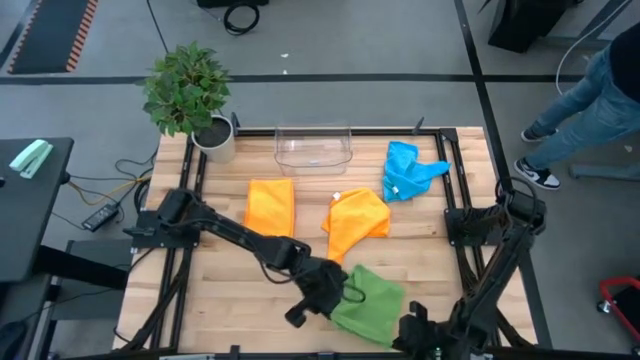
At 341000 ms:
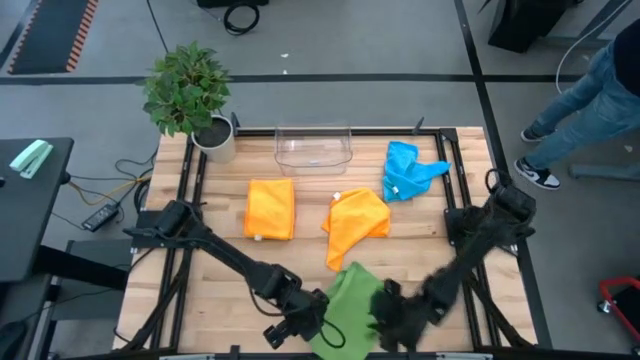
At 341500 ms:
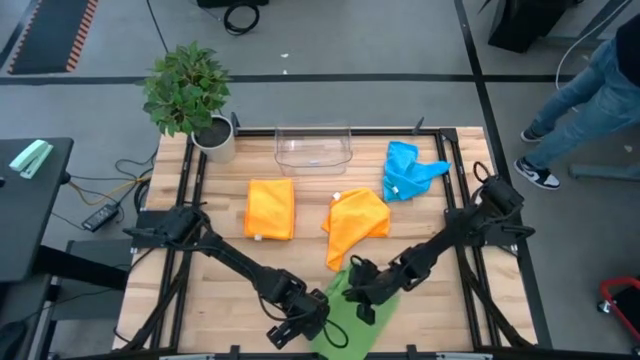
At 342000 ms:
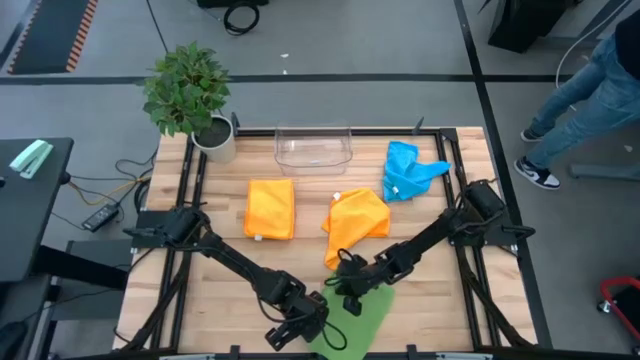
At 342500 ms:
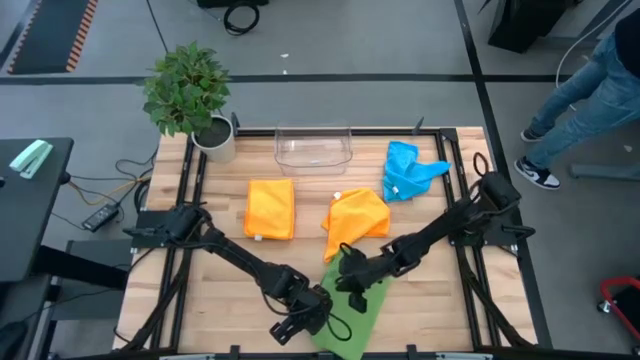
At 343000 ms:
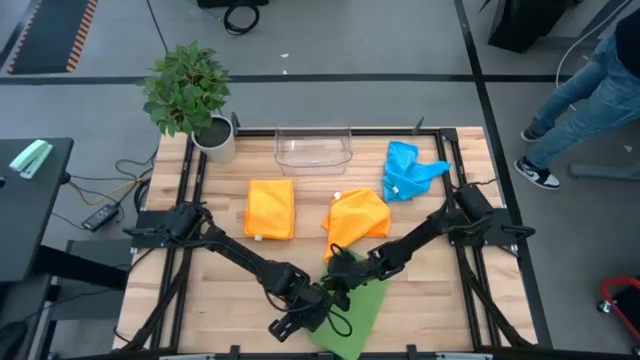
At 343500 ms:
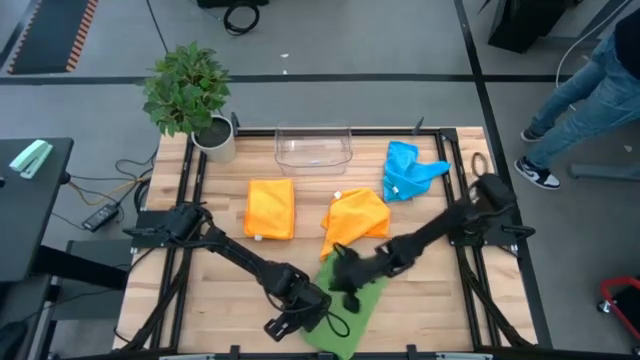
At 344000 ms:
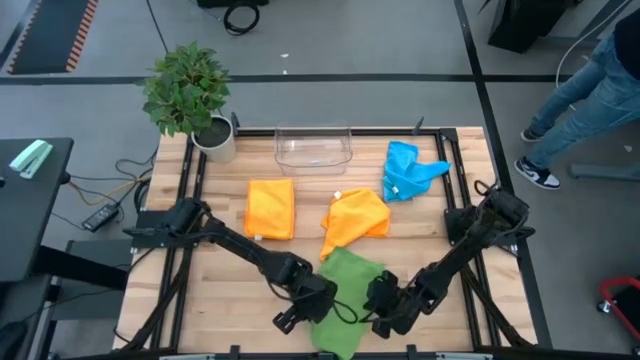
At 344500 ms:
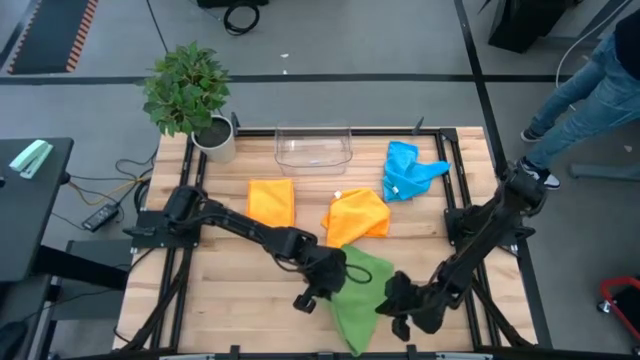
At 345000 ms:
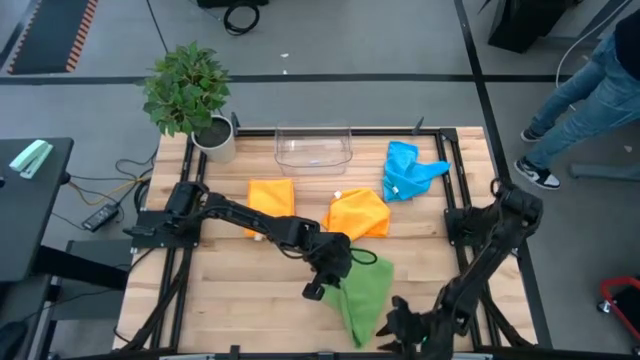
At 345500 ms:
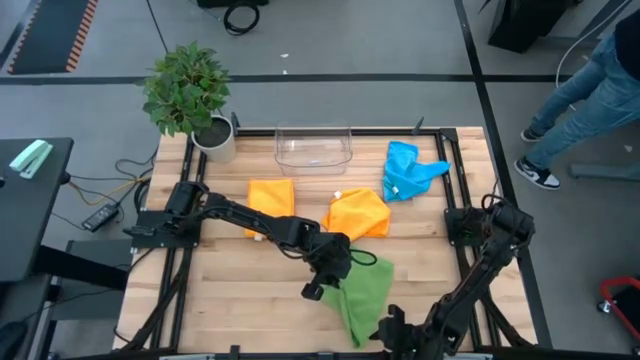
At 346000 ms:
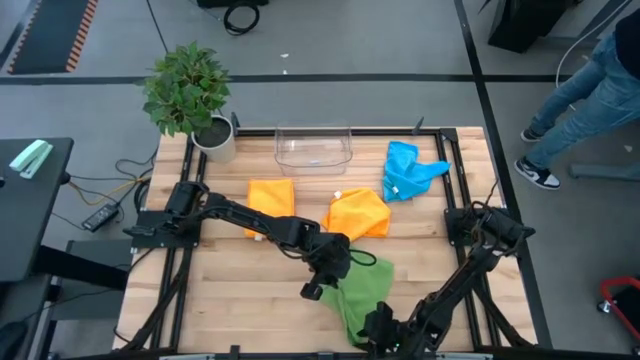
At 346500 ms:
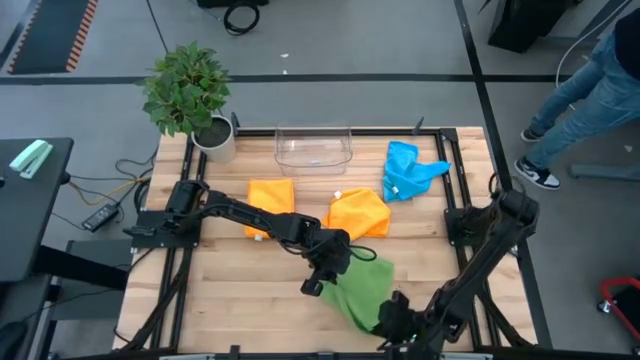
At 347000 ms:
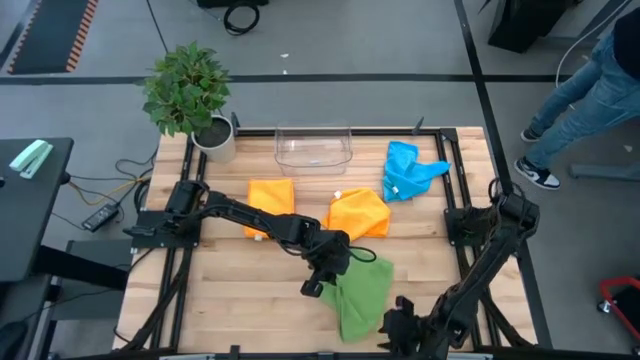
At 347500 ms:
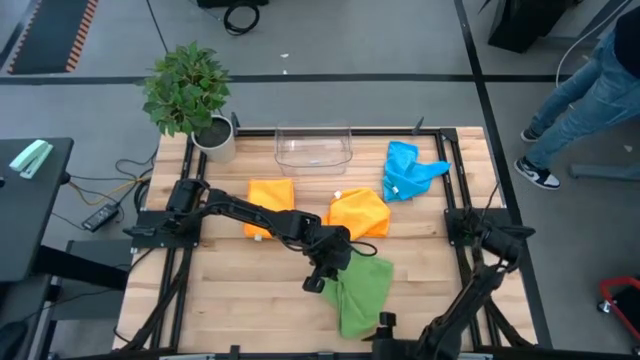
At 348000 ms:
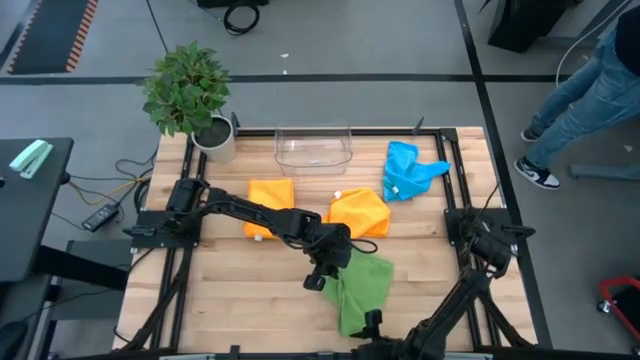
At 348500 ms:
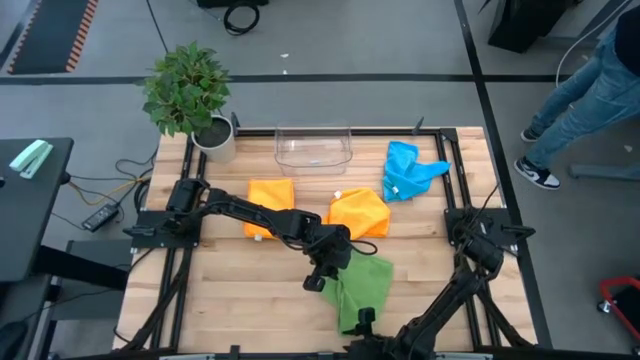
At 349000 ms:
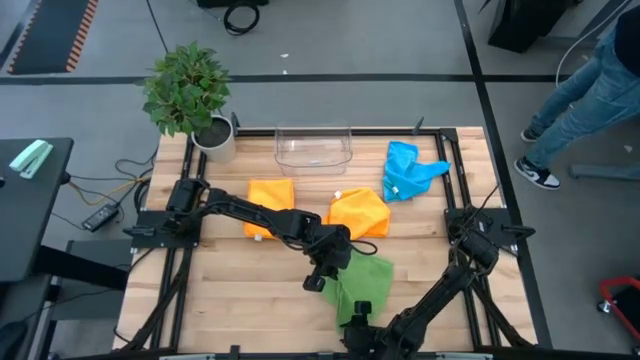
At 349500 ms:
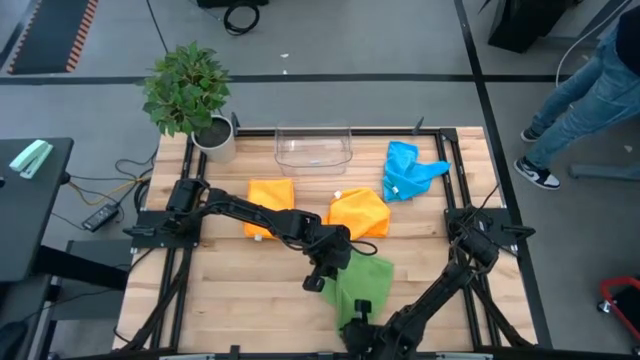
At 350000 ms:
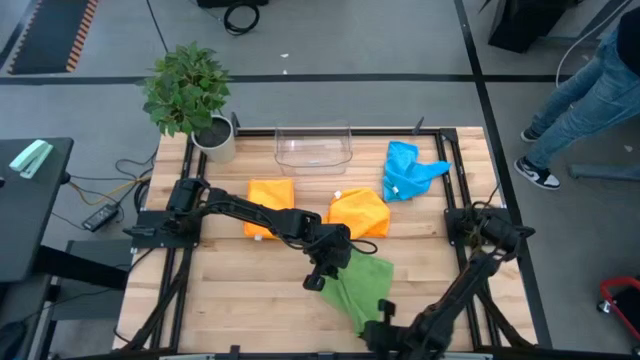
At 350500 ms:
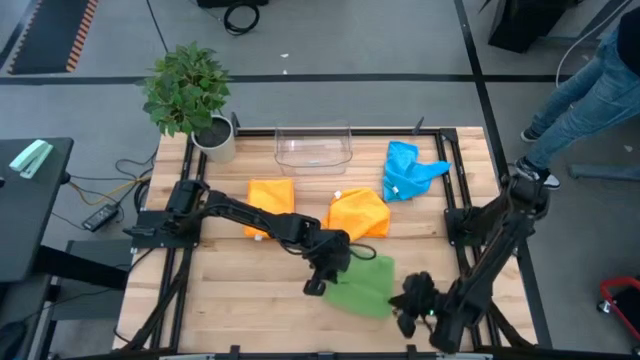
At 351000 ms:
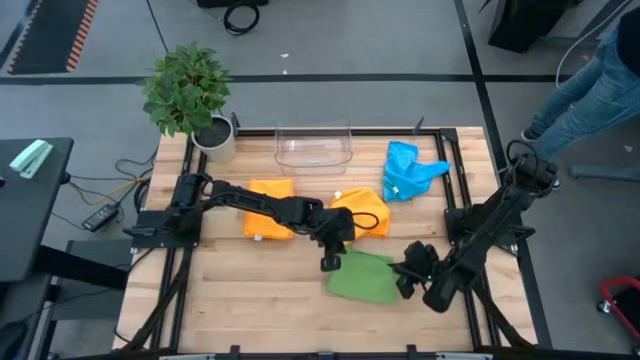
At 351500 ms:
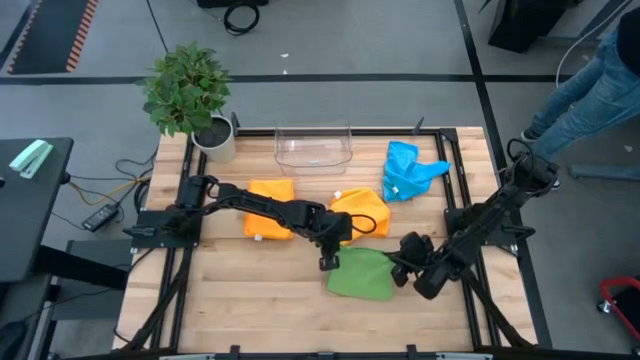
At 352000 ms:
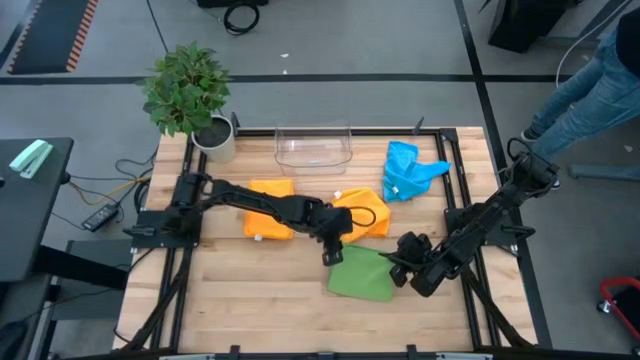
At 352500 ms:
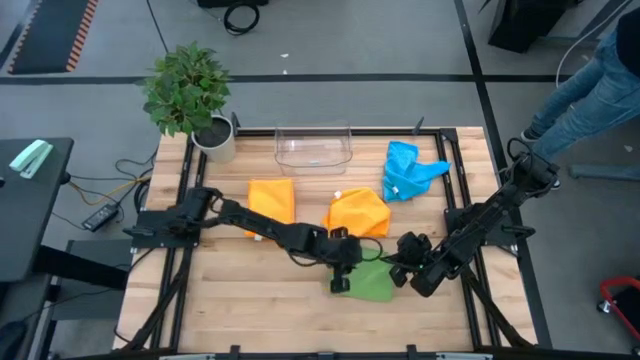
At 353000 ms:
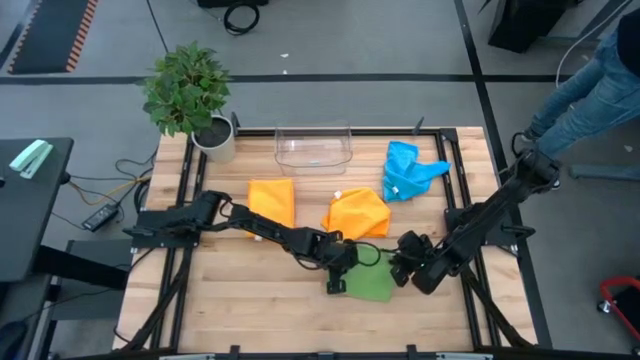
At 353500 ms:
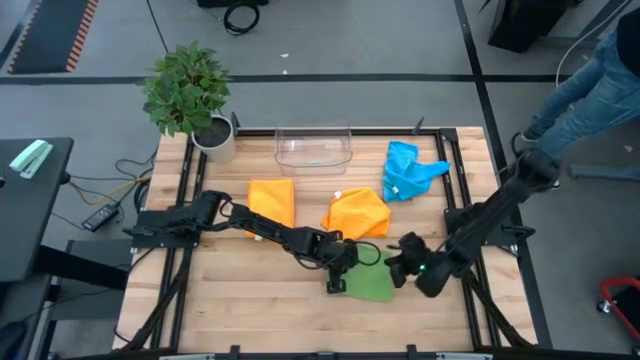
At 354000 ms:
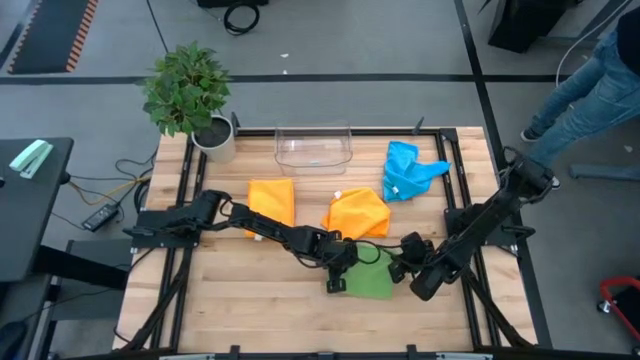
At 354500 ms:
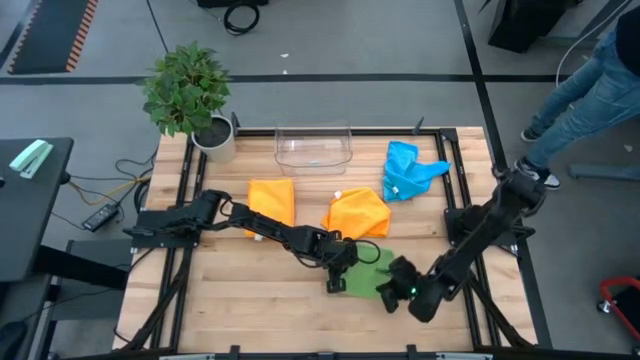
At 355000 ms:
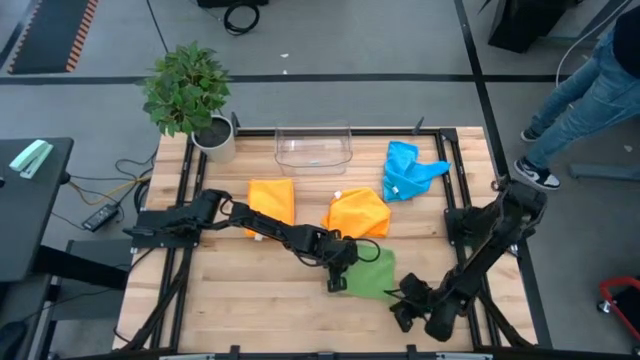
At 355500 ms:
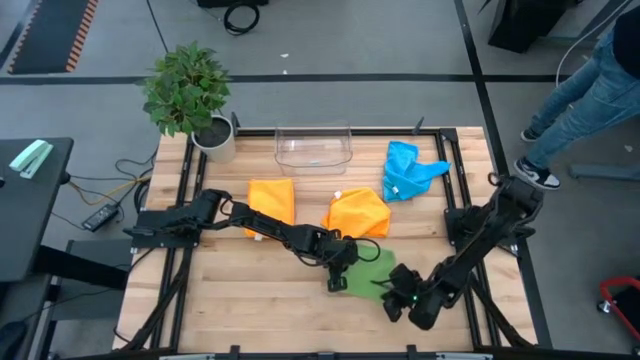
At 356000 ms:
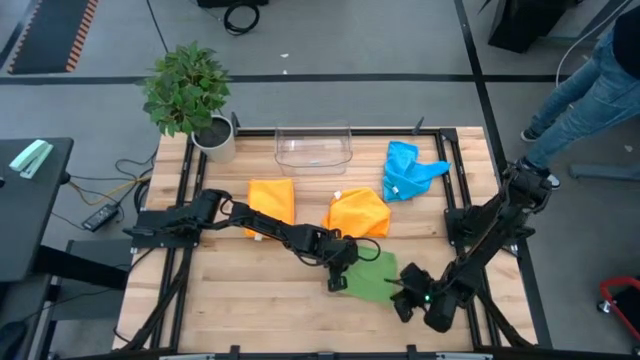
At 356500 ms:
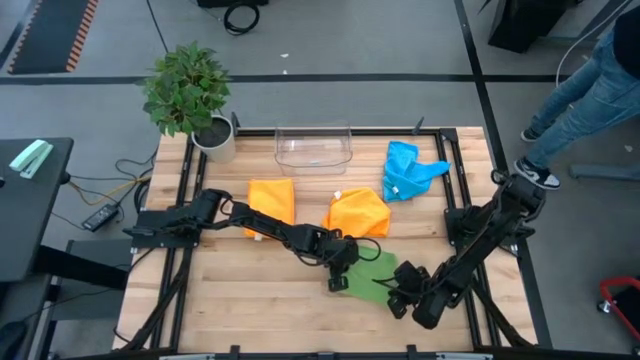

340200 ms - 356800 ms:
Task: Fold microfiber towels
Fold the green microfiber cloth

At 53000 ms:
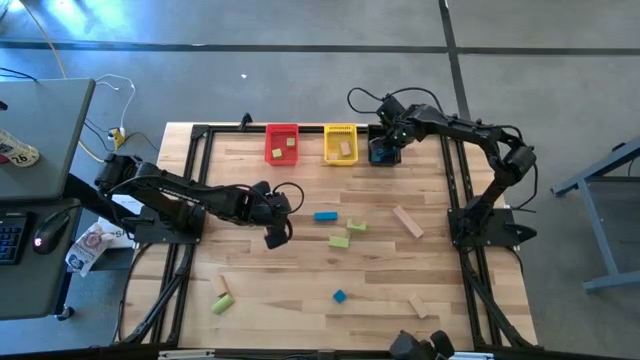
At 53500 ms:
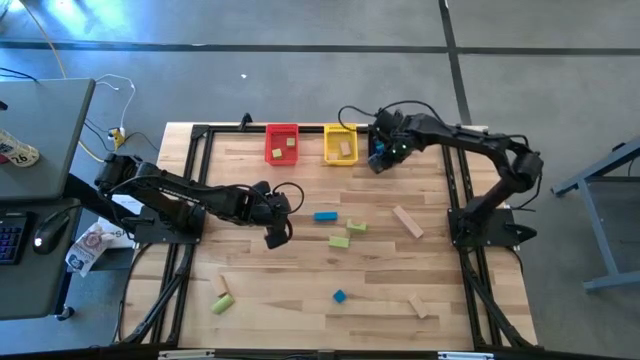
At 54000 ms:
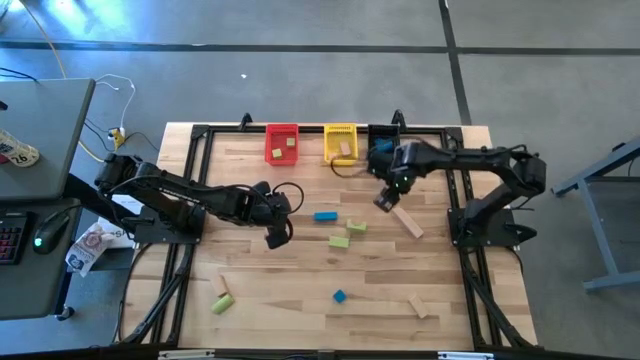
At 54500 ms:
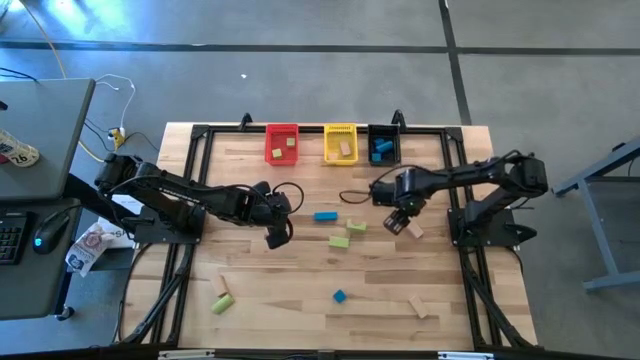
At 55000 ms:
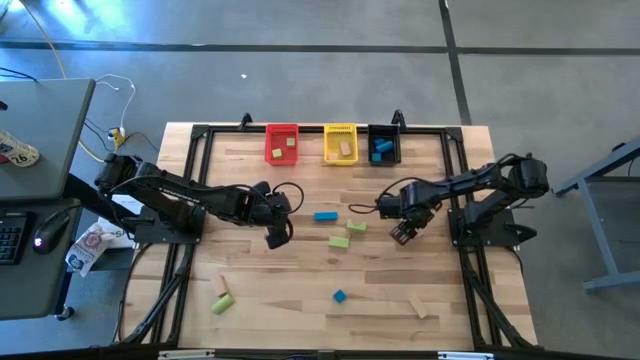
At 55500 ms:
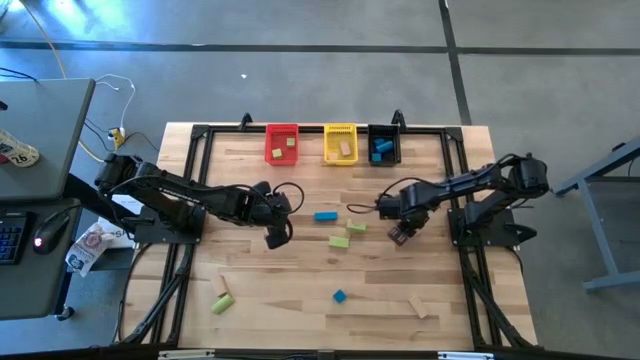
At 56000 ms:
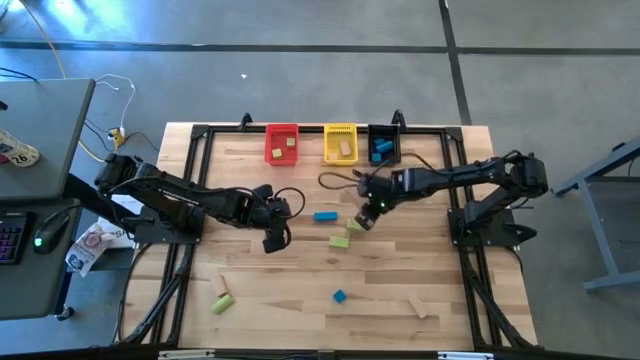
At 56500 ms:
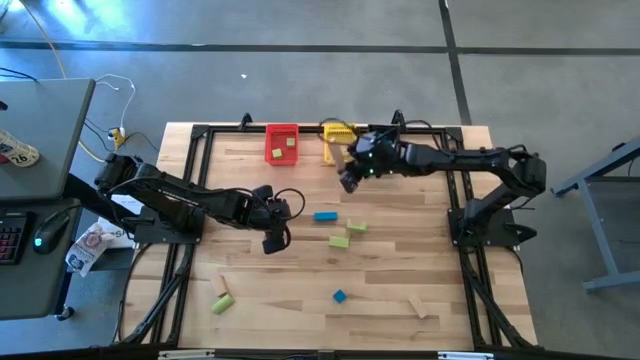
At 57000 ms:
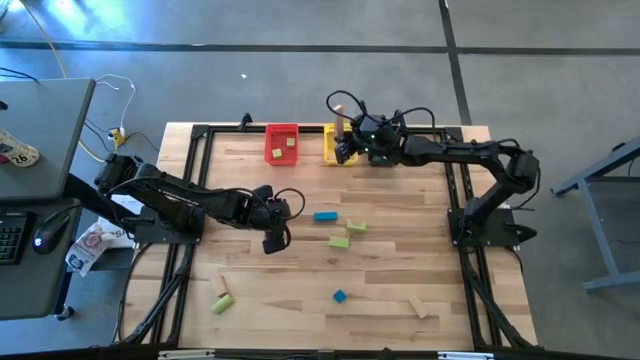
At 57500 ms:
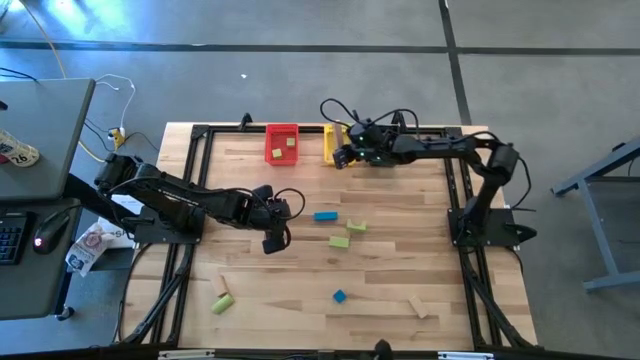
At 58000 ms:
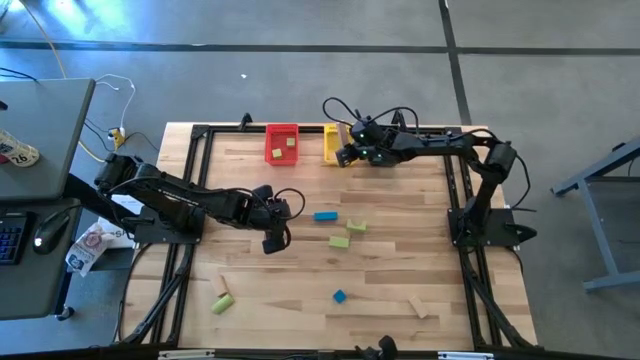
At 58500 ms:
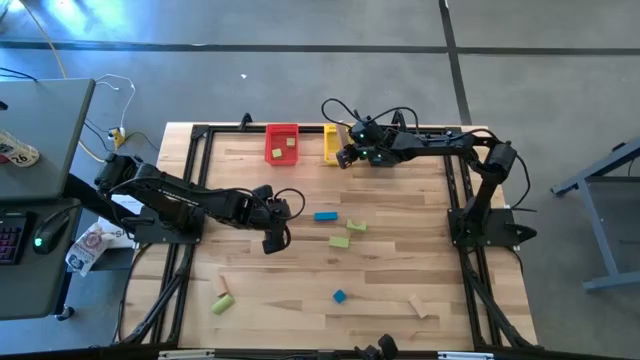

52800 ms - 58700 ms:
Task: Sort & place blocks by color
Put the beige block into the yellow bin
